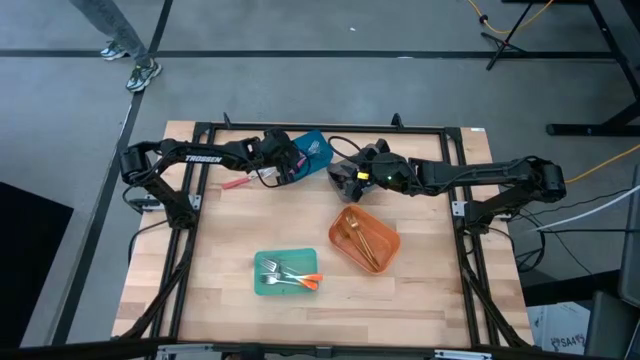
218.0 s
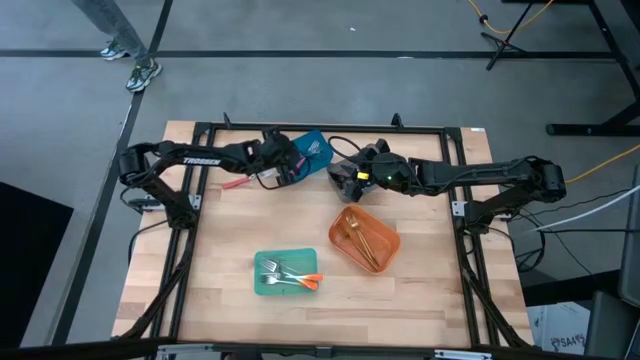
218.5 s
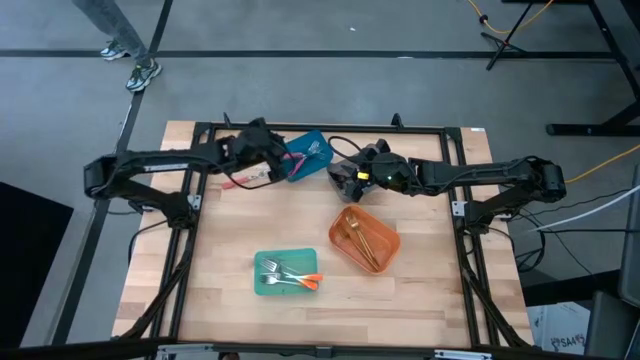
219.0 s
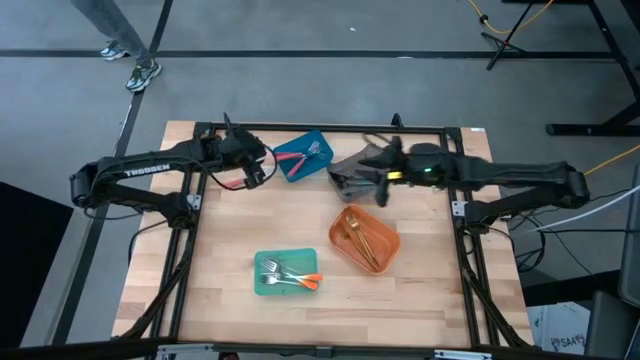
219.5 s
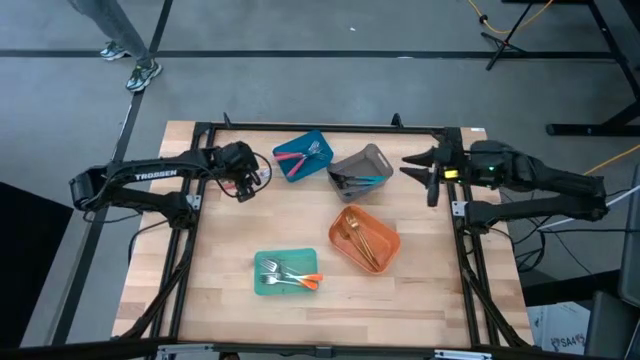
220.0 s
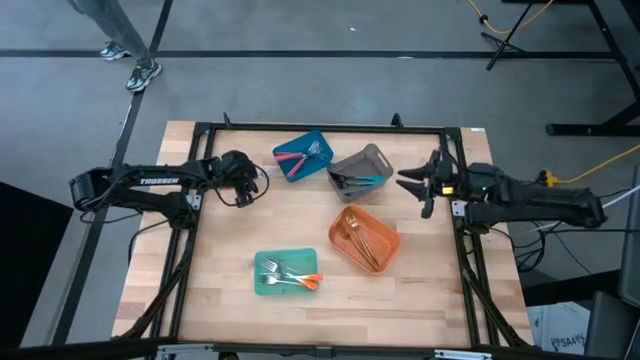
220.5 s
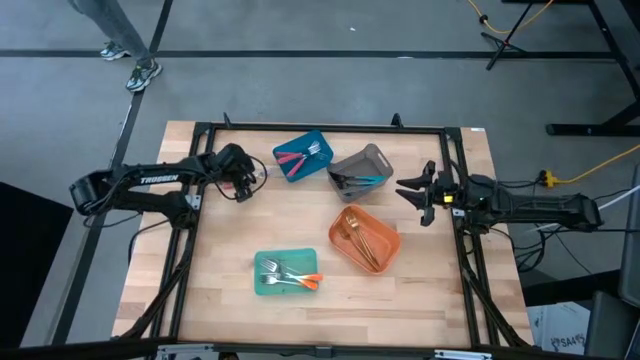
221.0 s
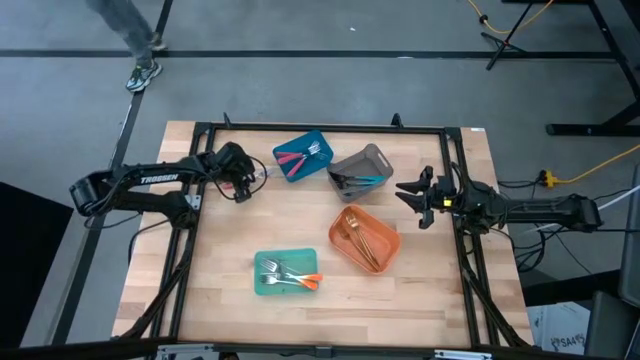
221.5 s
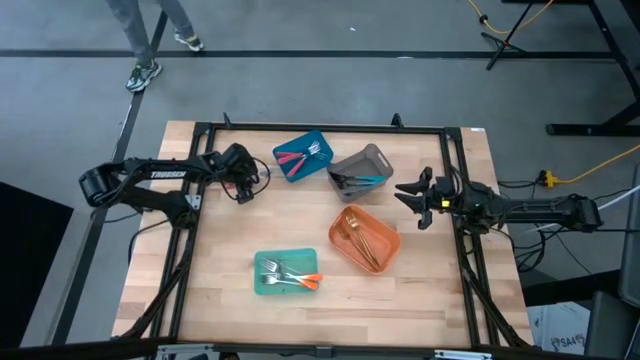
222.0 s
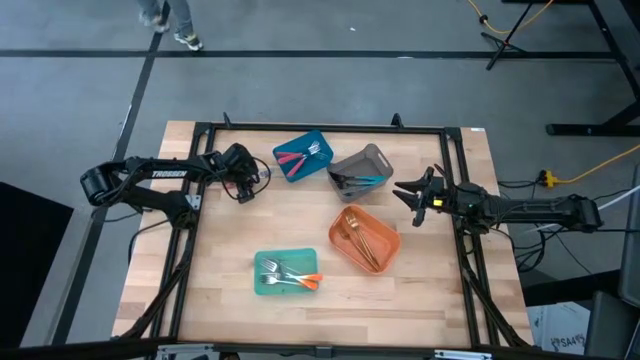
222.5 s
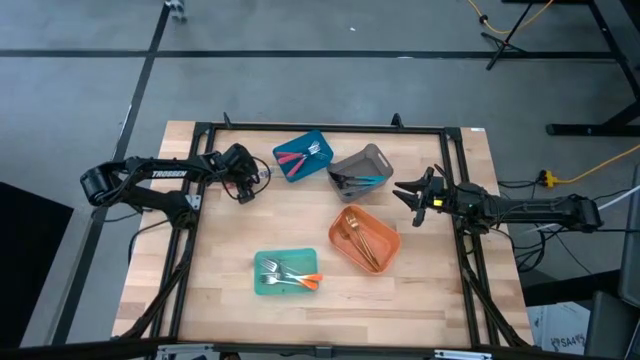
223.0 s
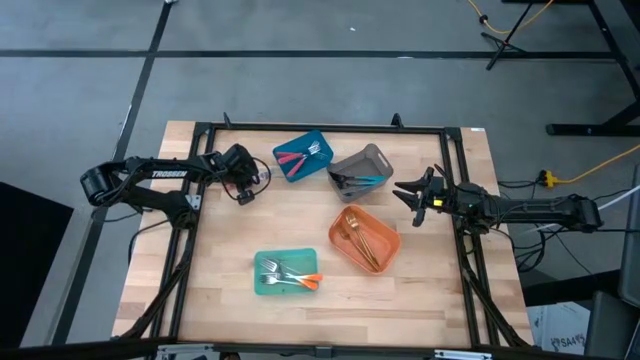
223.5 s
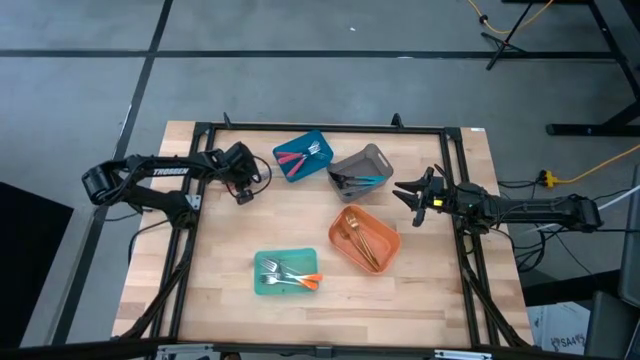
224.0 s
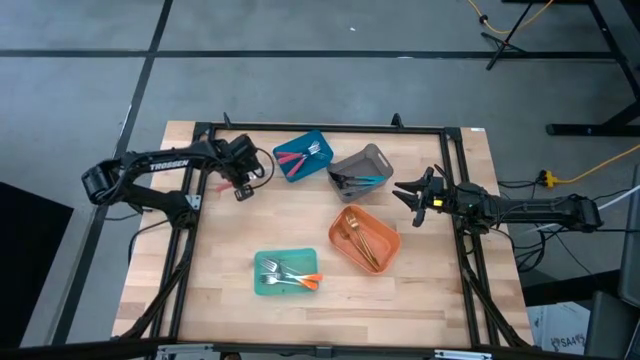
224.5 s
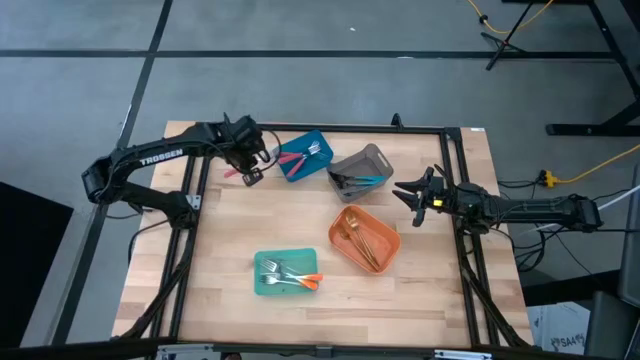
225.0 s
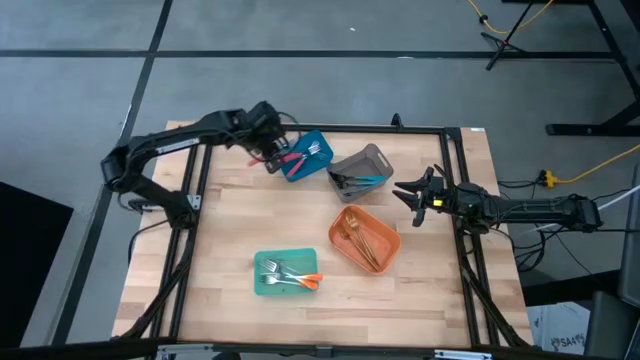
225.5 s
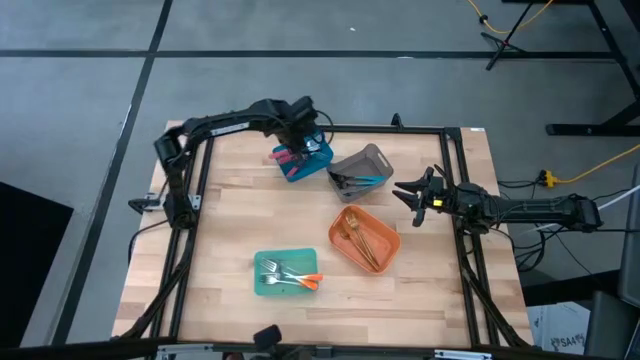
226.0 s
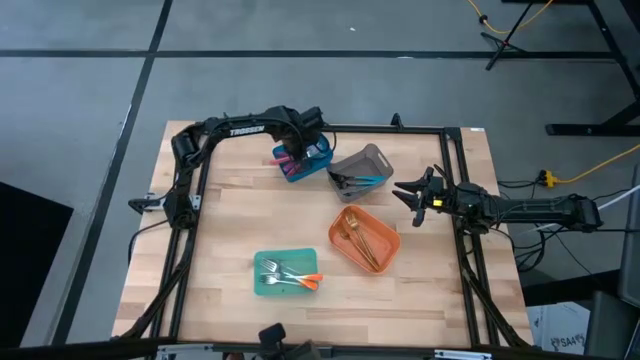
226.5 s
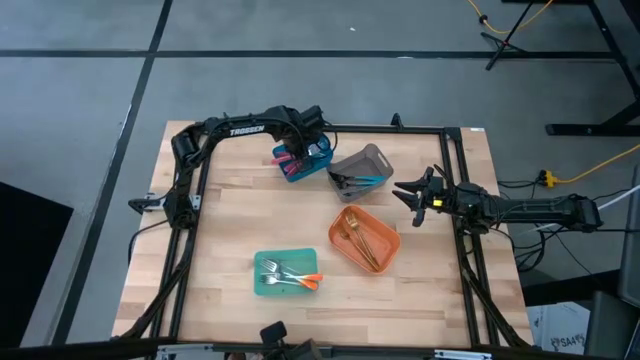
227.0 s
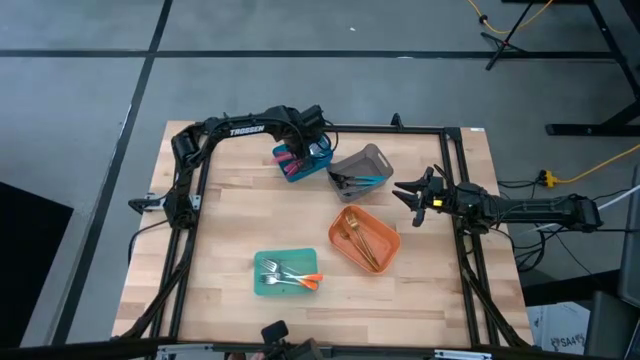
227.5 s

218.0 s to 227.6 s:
Task: Sort silverware by color (type)
Put the pink fork into the top left blue bin

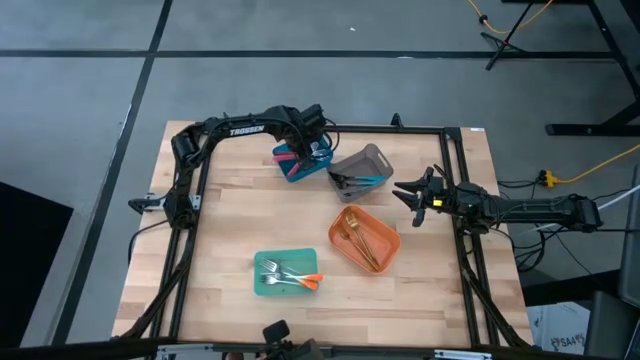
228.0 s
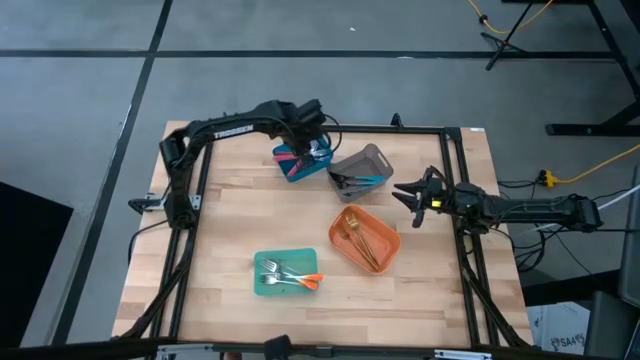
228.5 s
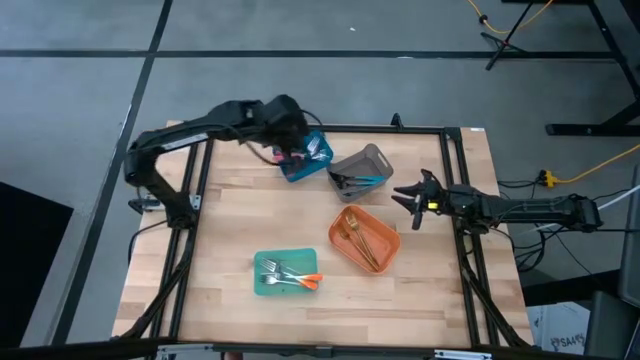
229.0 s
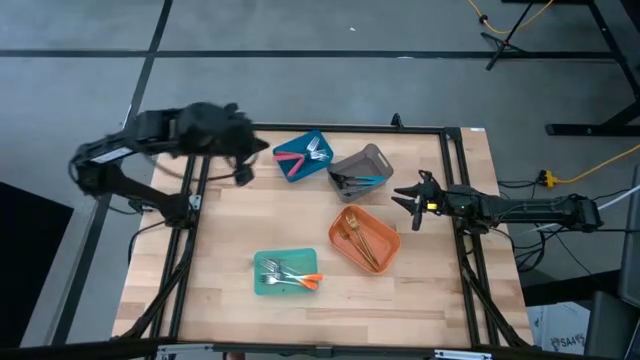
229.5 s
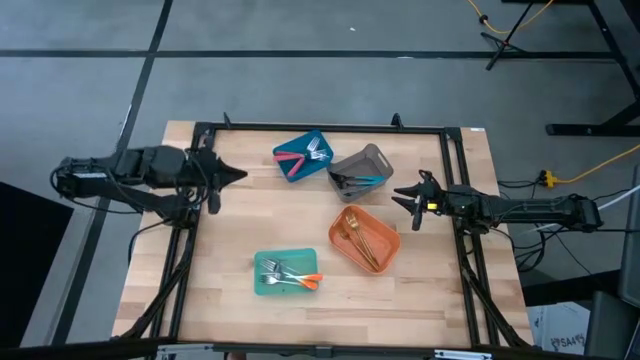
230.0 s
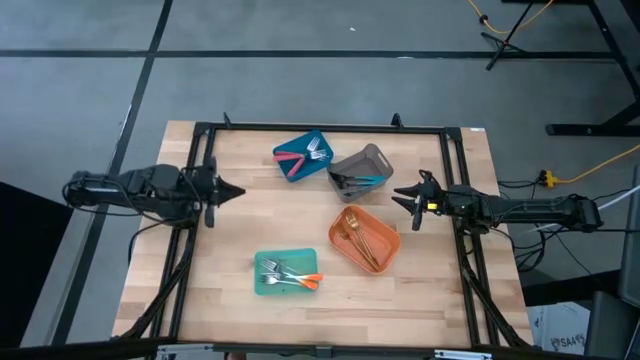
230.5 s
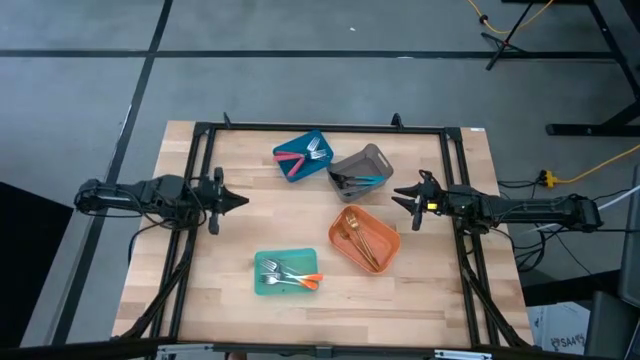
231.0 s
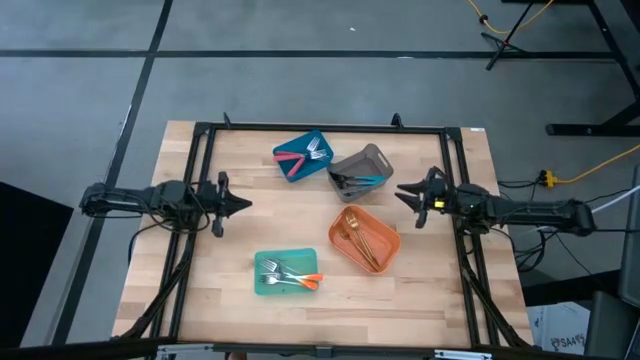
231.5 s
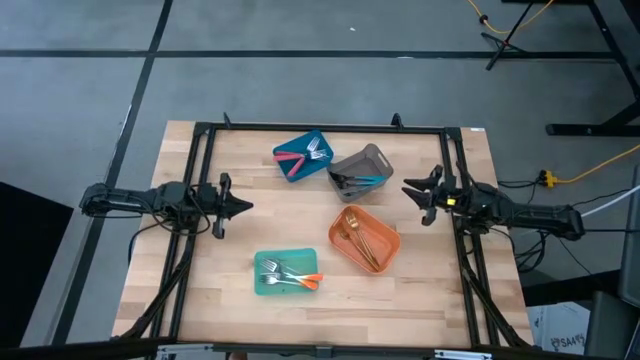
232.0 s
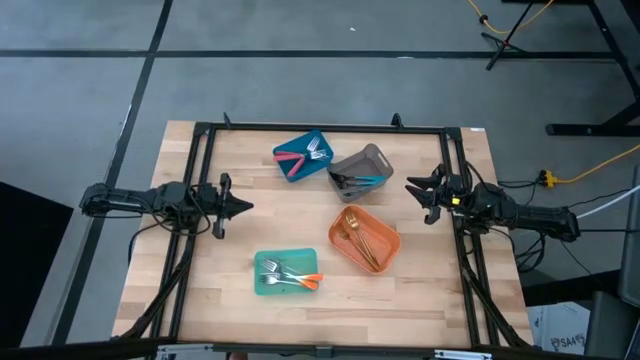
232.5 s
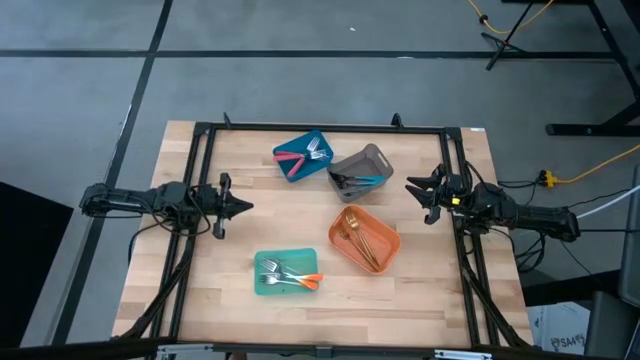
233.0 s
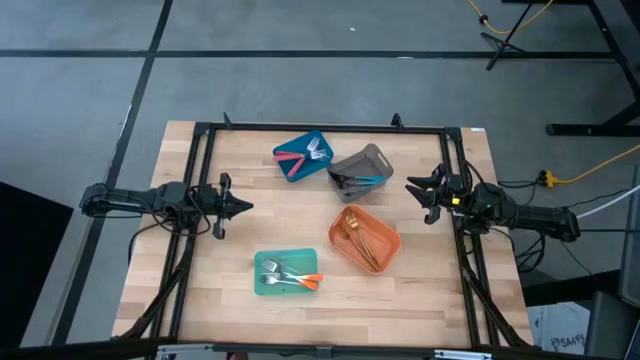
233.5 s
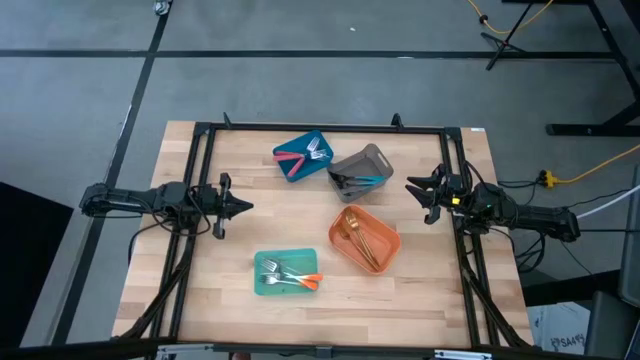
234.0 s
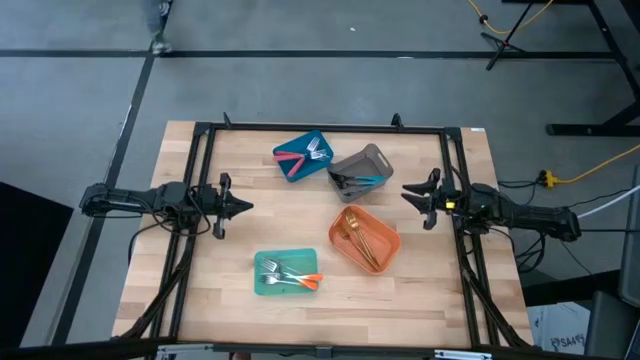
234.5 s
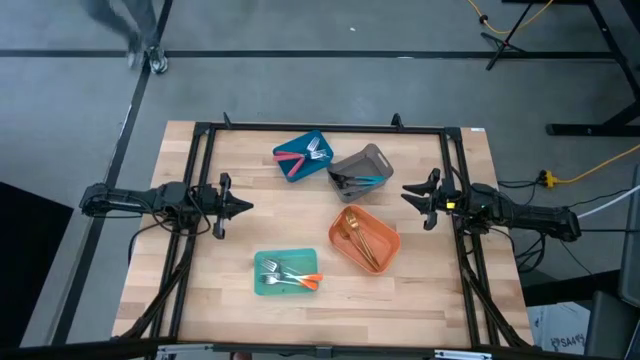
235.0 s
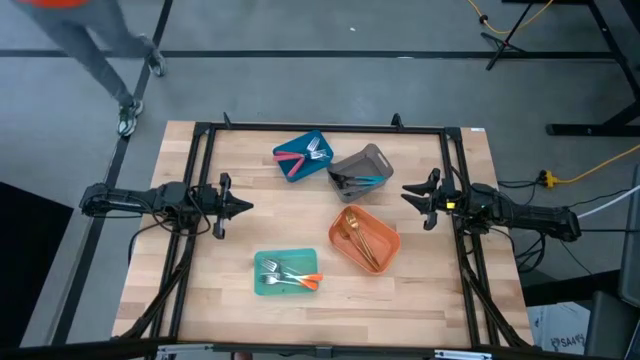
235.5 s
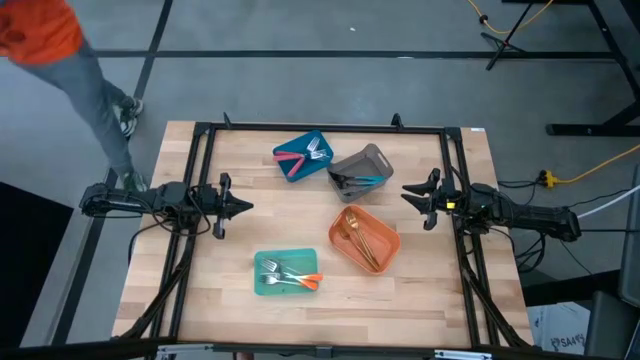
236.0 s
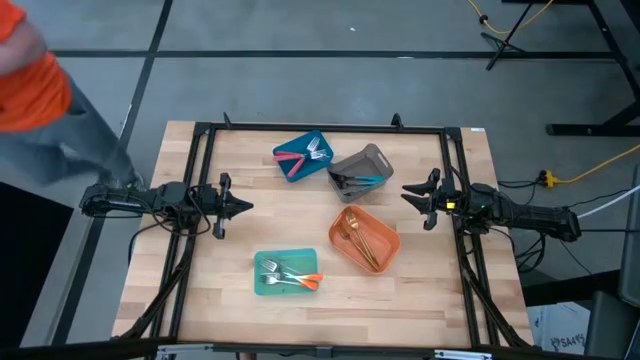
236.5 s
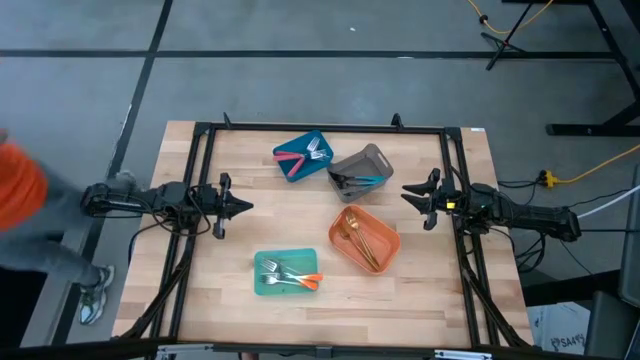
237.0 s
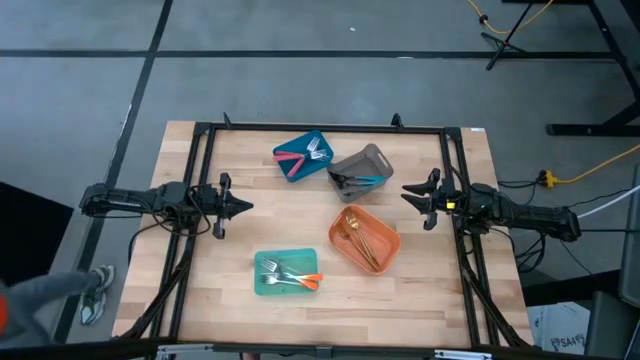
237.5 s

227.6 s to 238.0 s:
Return to Home Position

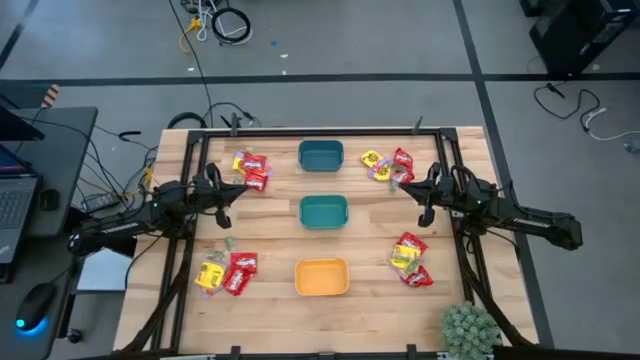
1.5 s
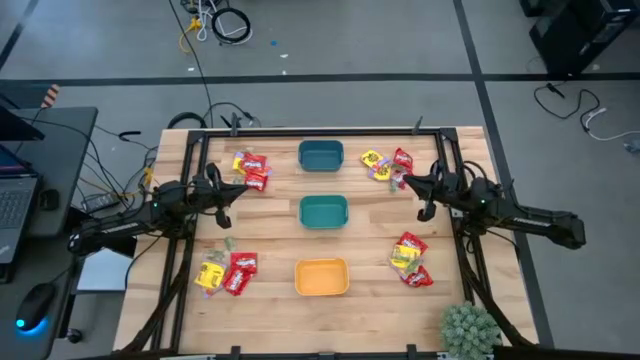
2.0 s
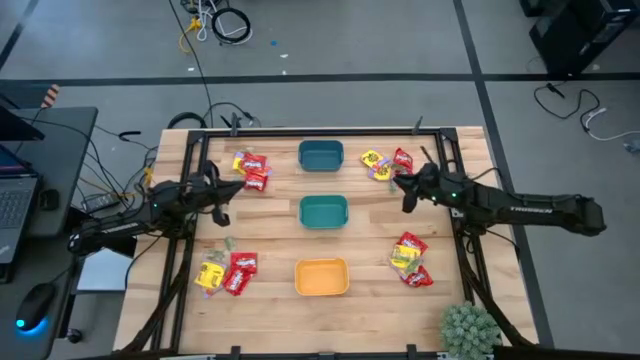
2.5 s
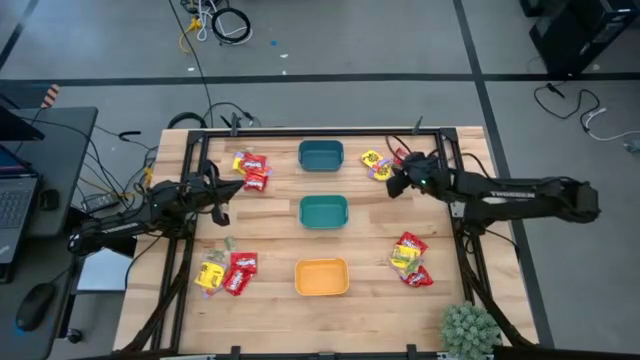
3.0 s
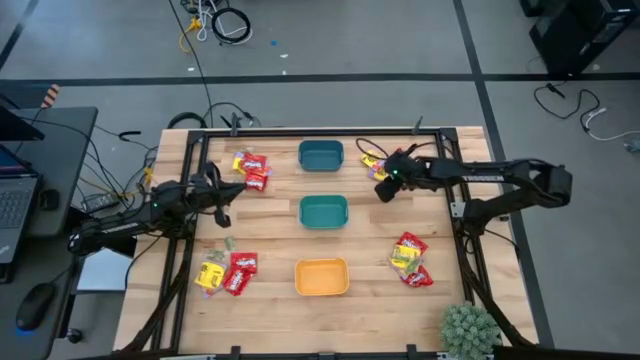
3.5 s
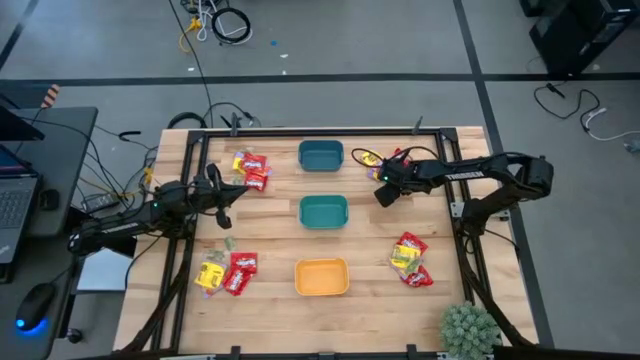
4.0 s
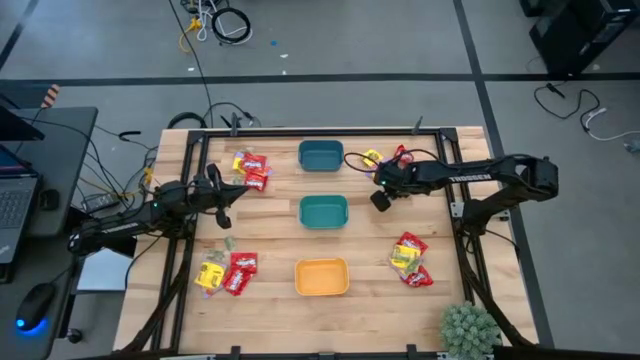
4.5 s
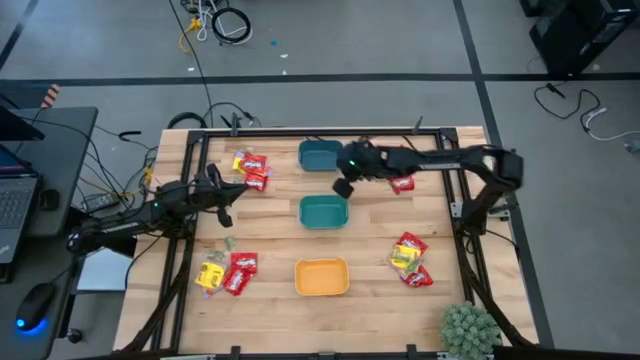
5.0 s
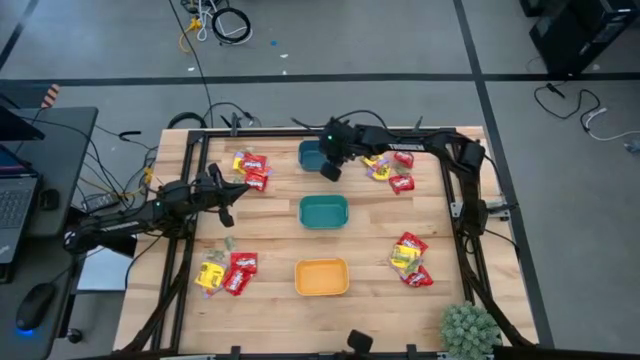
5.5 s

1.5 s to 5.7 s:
Task: Sort candy
Put the green gummy into the blue bin
